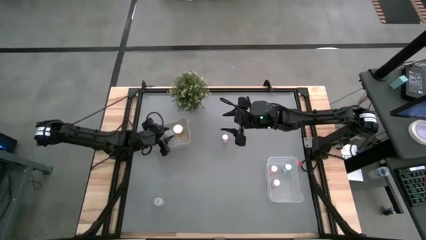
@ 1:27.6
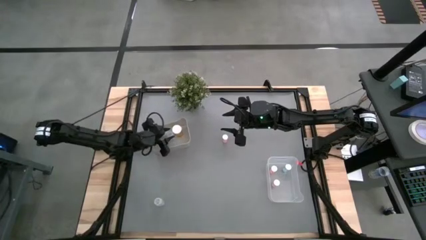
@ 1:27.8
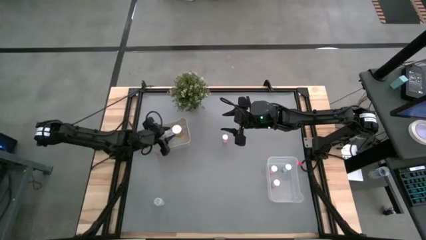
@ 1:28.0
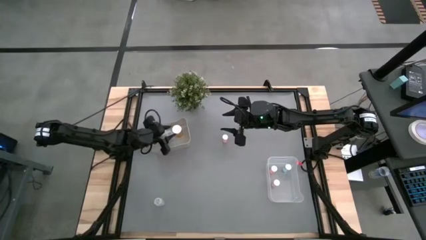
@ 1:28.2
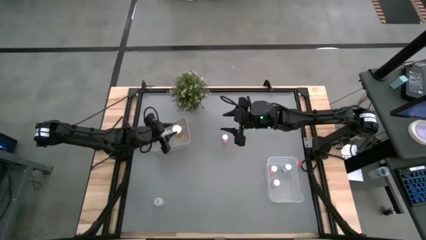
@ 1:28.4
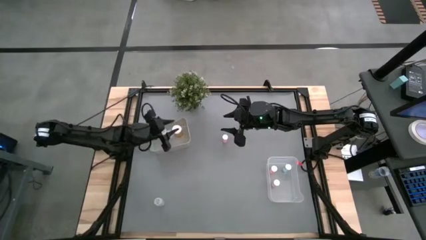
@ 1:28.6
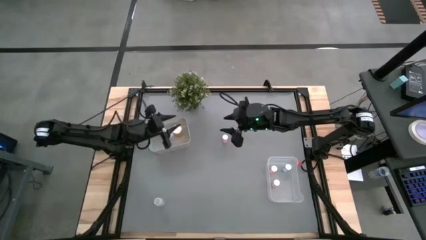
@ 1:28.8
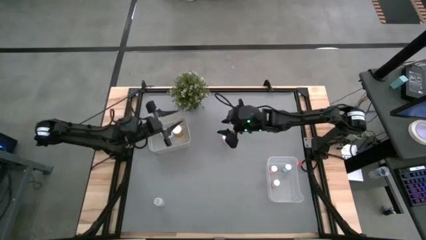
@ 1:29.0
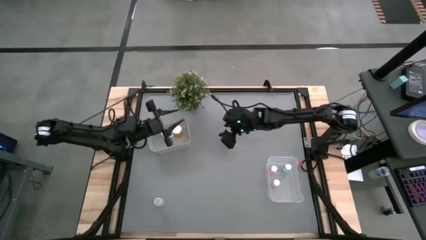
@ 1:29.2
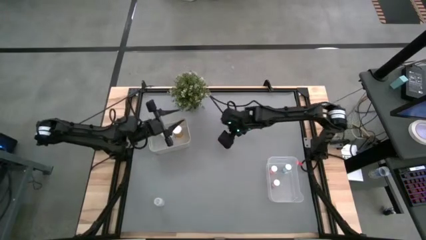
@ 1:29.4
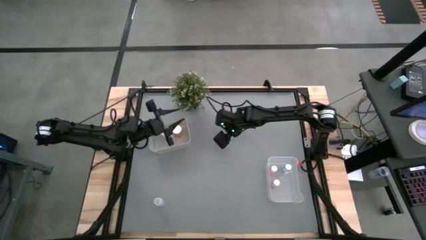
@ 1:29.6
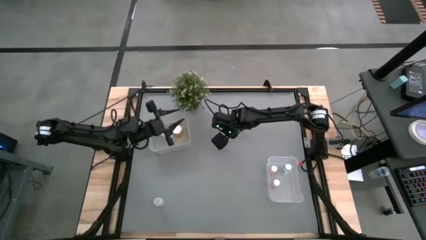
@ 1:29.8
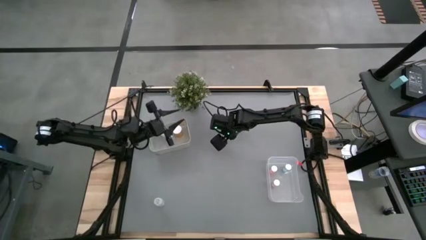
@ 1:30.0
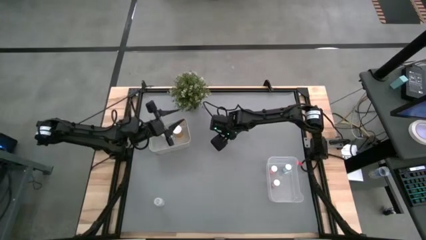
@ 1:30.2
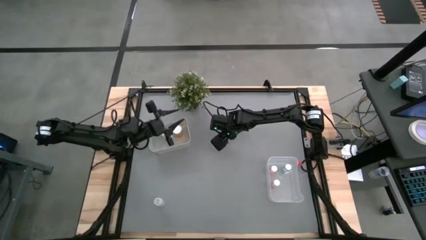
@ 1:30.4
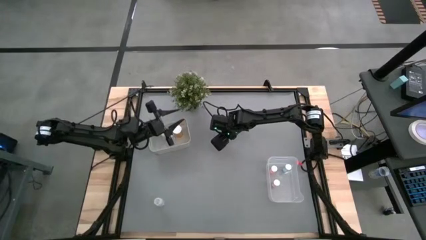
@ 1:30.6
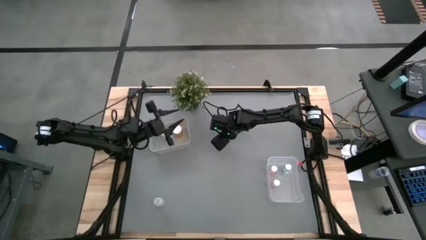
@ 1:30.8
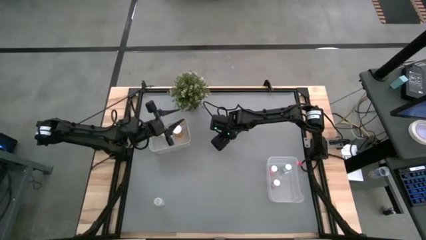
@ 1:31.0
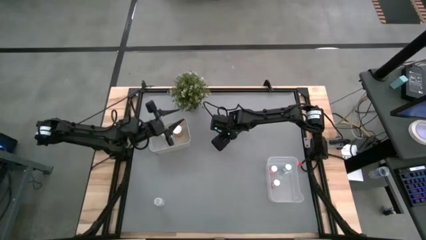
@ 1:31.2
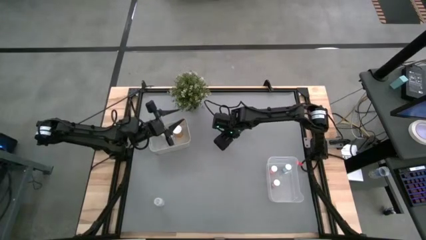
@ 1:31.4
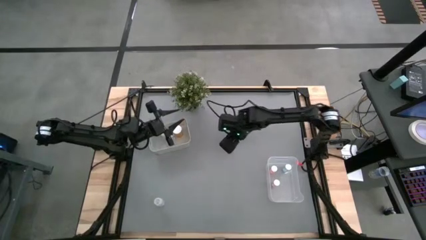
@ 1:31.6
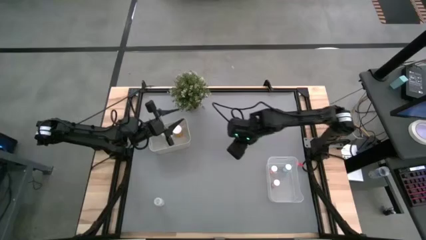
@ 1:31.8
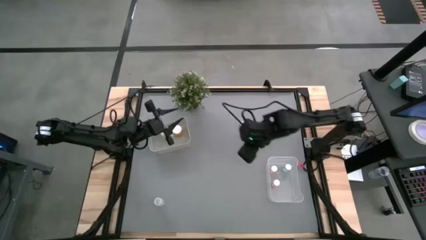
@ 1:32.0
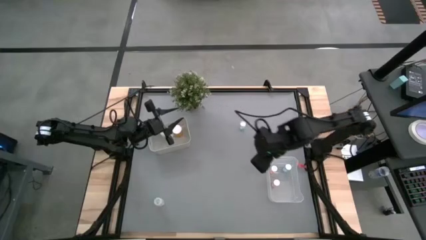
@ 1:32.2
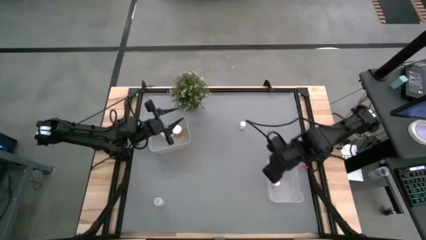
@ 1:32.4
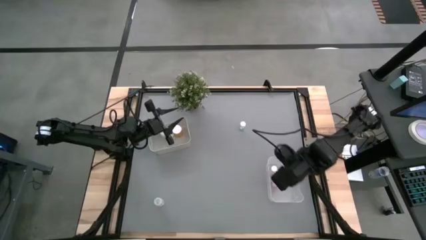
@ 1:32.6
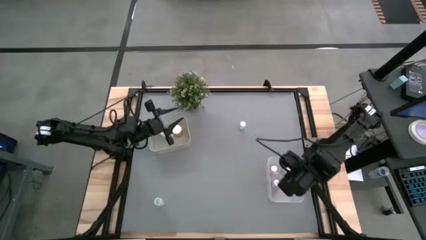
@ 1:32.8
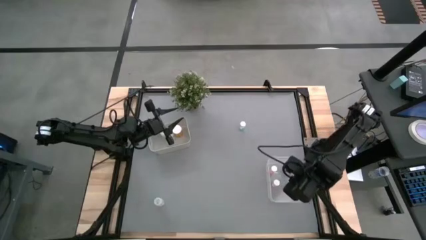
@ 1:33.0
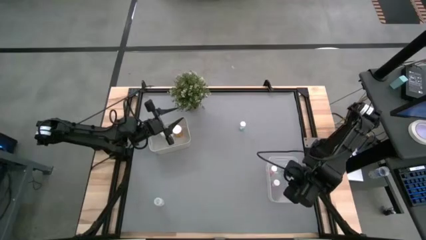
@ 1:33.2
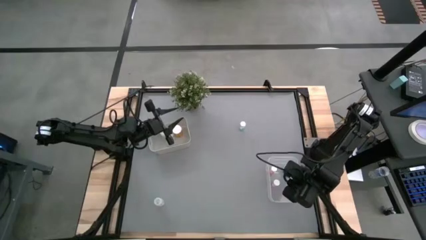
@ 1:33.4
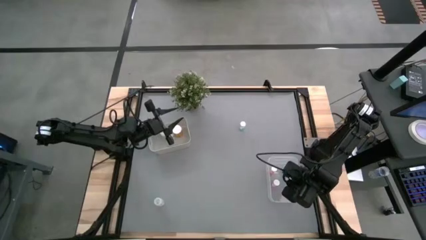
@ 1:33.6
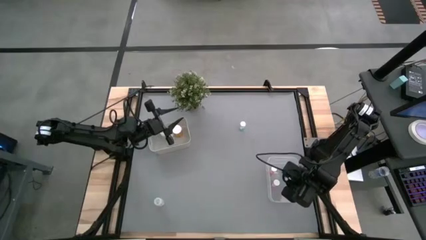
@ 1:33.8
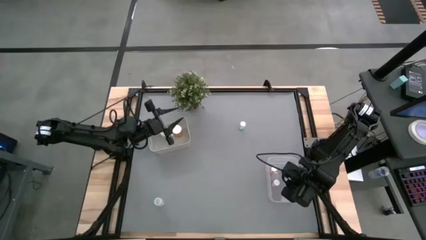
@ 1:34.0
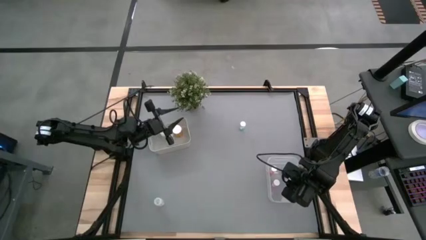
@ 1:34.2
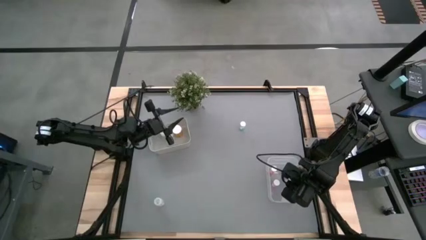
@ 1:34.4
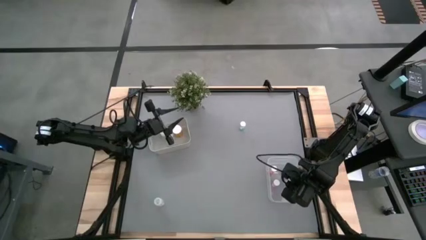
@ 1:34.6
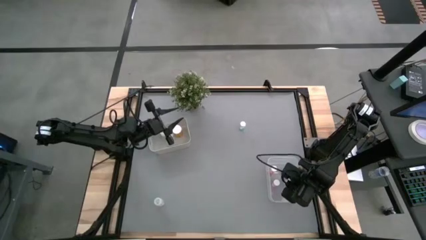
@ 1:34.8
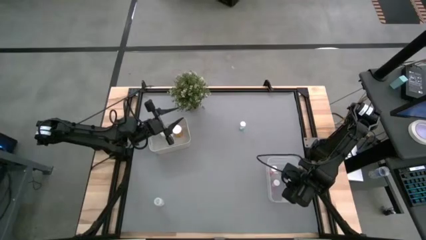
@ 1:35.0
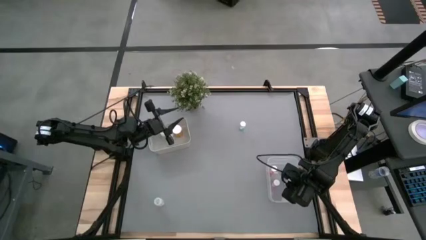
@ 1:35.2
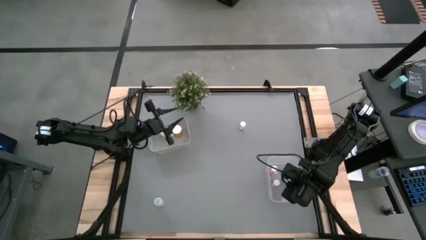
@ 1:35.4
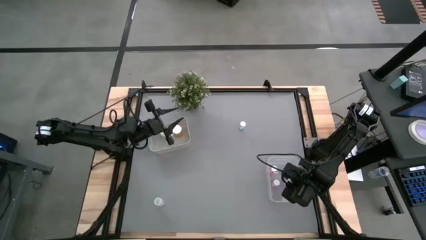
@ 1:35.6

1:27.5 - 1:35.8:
Task: Pick and place medicine bottles into bin by pill shape (circle, oval)
Put the pink pill bottle into the transparent bin

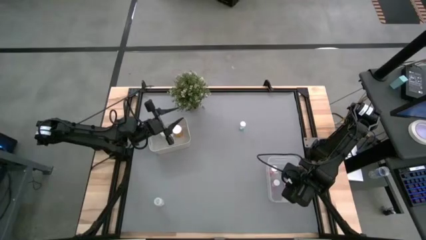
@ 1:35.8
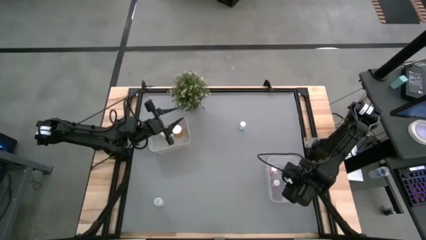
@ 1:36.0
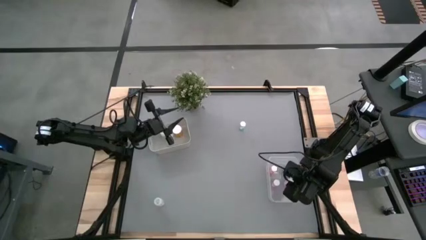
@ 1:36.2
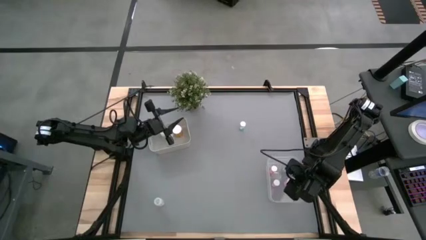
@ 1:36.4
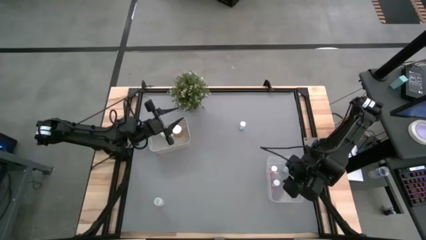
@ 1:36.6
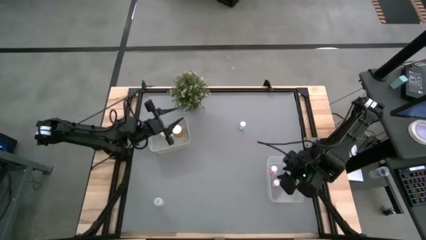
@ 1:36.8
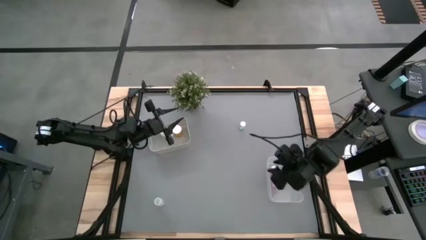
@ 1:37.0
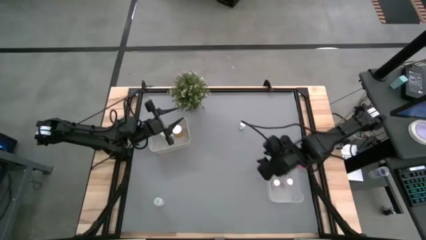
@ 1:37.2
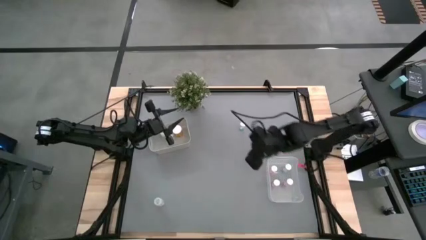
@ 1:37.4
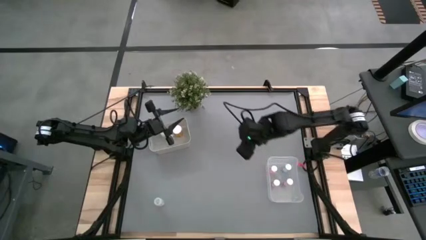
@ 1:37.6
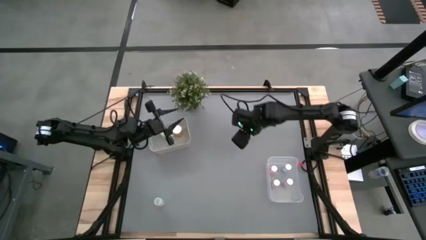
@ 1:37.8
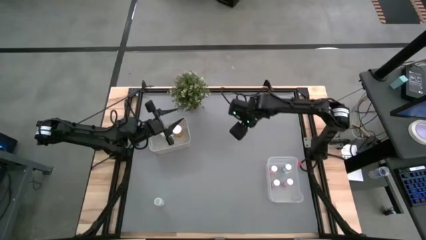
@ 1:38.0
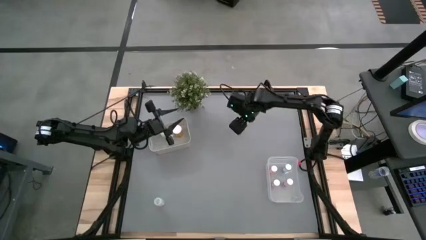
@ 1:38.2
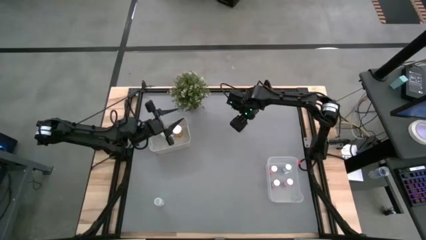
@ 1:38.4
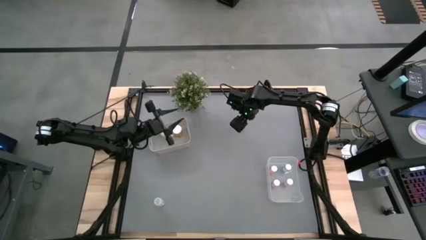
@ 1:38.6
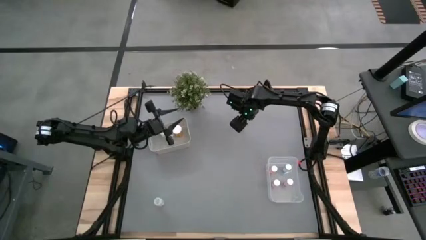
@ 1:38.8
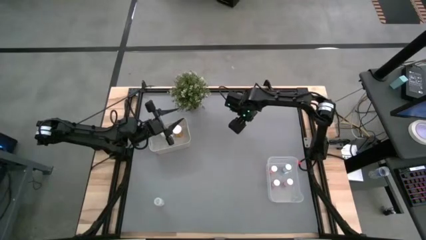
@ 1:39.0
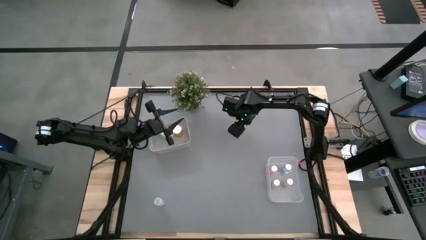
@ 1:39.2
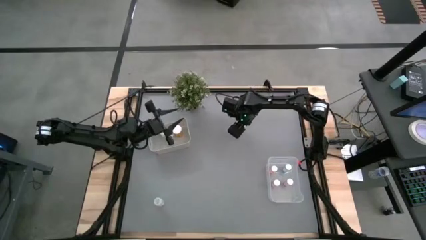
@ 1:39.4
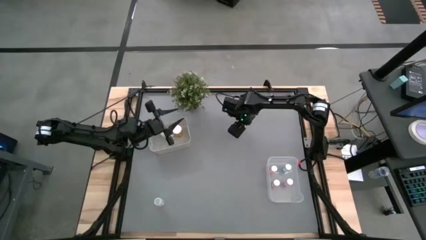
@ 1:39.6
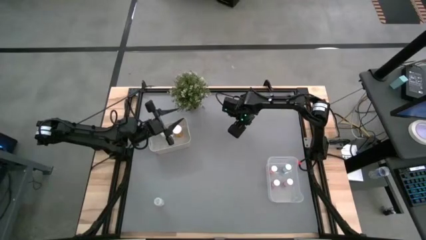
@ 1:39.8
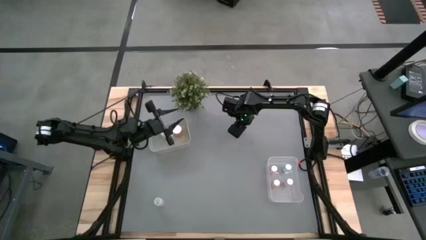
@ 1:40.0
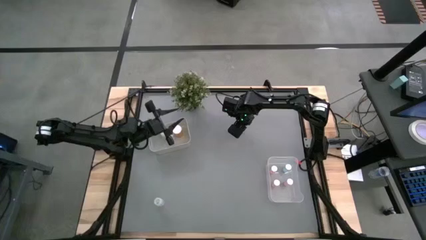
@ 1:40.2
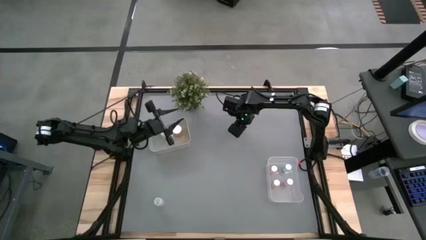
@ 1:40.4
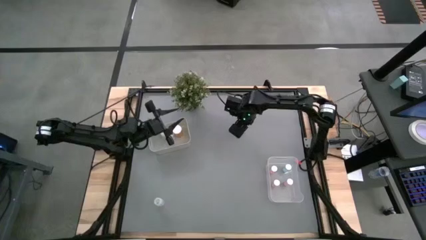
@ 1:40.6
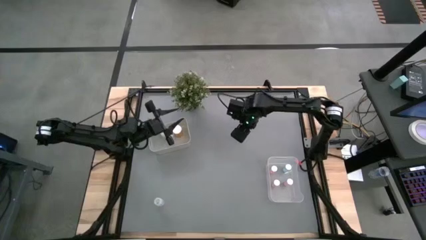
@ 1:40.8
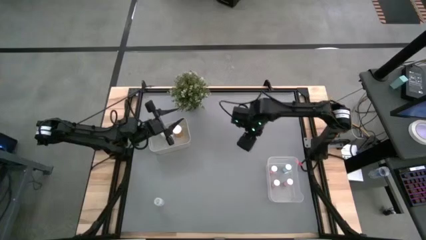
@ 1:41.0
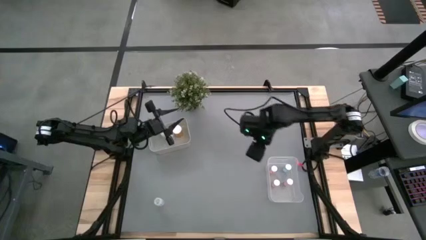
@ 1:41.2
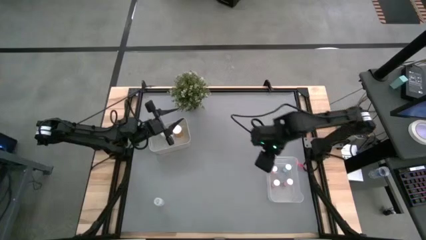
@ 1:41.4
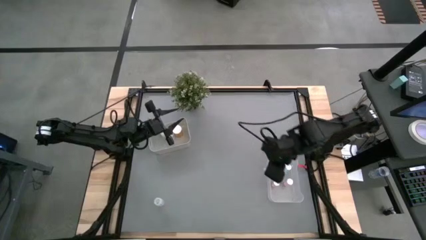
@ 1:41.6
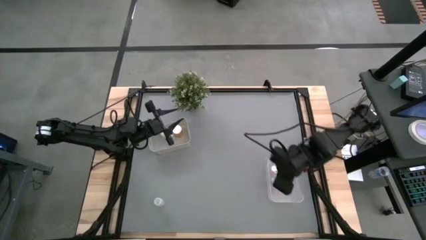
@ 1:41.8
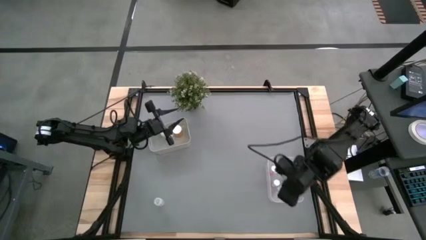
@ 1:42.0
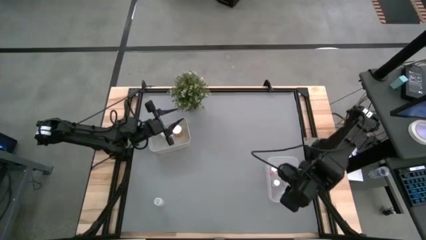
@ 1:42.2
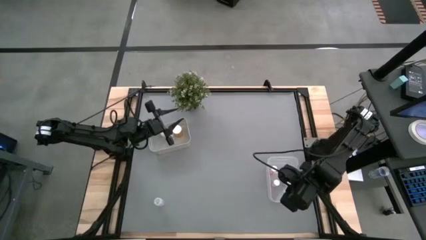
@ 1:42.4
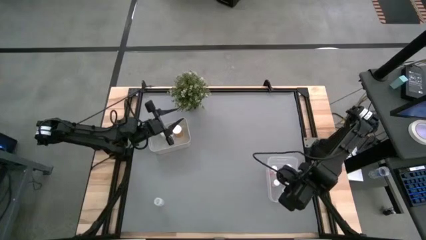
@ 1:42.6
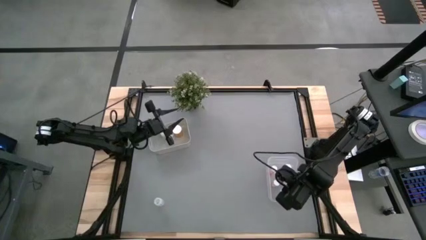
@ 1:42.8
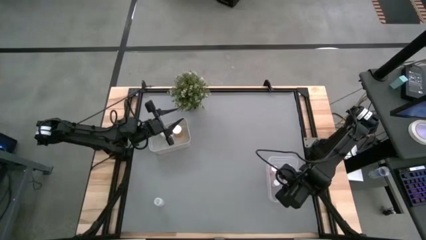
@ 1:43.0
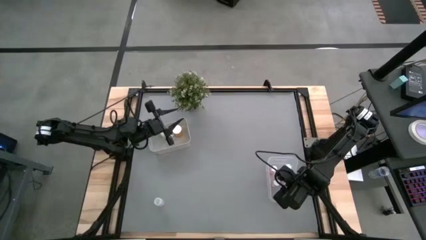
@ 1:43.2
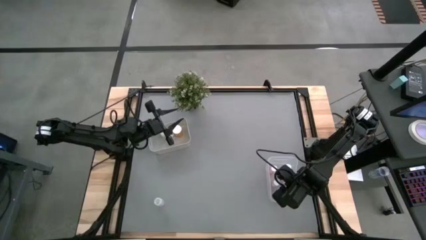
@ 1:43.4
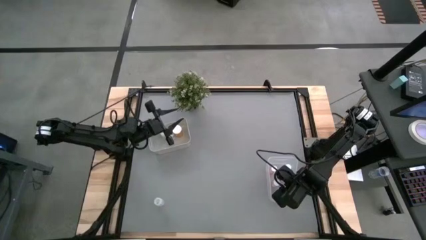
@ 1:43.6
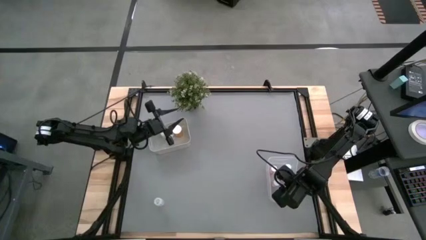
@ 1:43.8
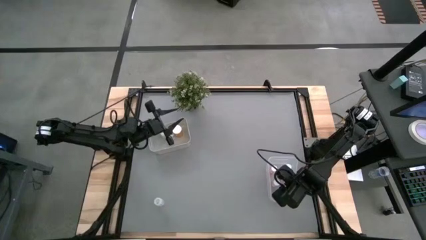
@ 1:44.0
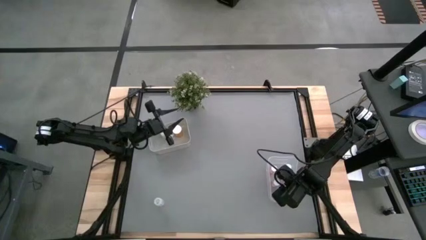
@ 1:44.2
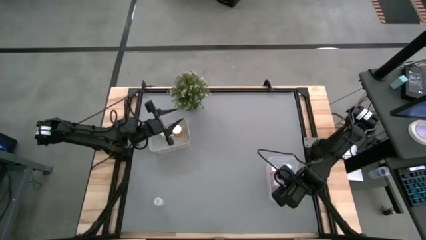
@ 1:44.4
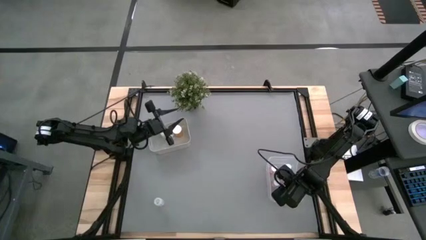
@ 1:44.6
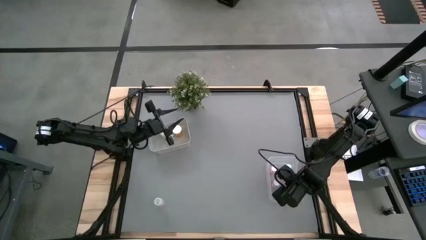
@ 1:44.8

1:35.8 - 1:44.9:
Put the blue pill bottle into the transparent bin
